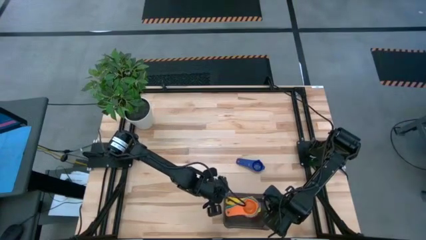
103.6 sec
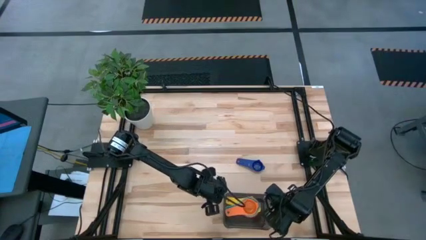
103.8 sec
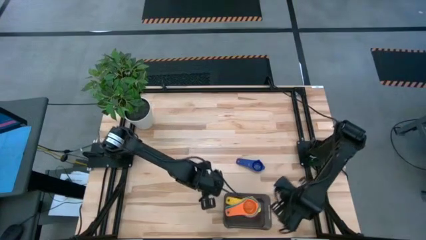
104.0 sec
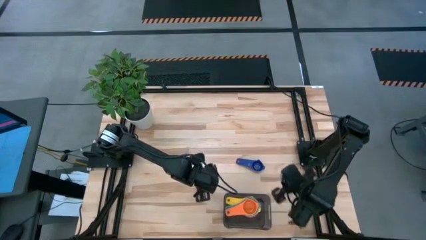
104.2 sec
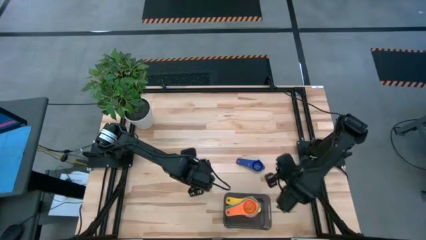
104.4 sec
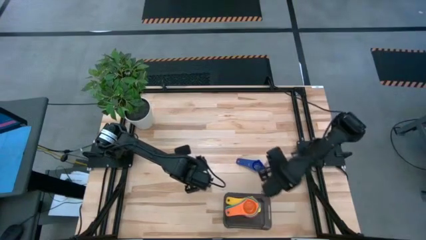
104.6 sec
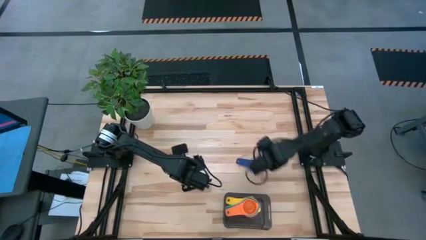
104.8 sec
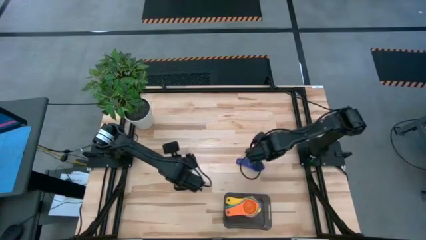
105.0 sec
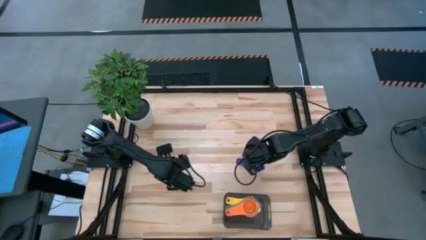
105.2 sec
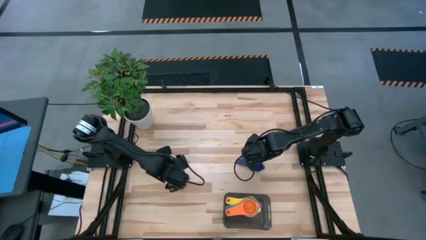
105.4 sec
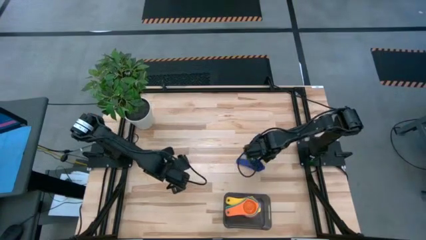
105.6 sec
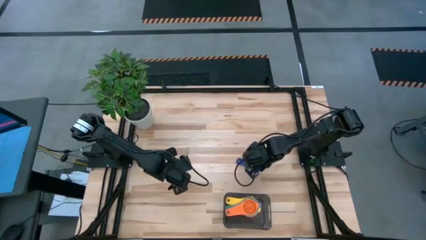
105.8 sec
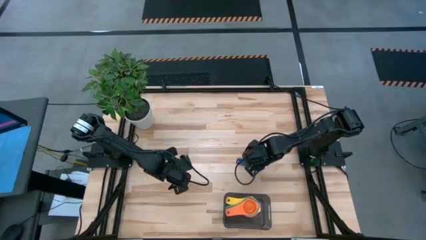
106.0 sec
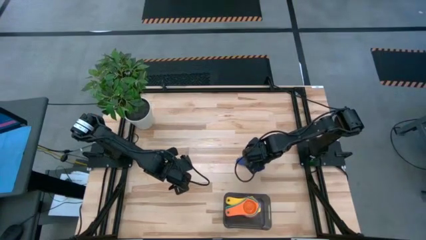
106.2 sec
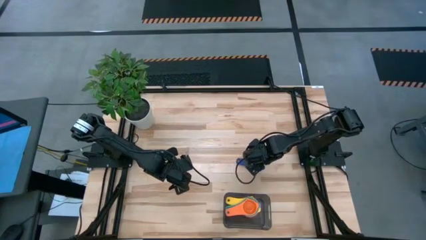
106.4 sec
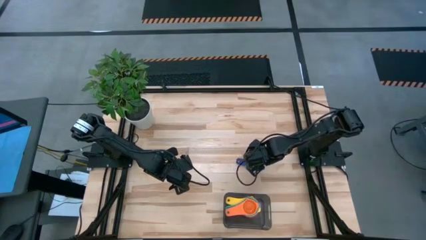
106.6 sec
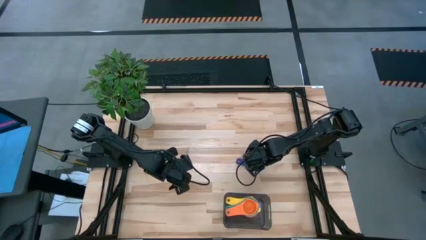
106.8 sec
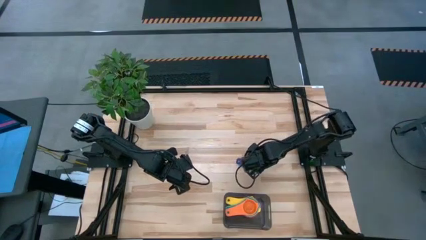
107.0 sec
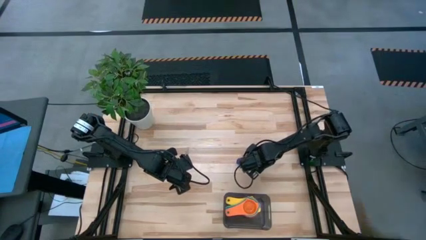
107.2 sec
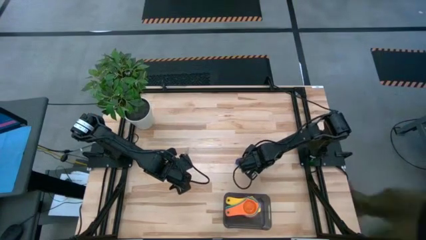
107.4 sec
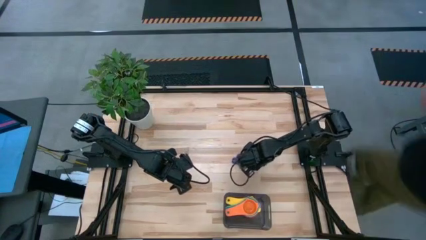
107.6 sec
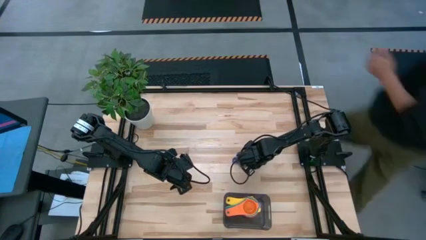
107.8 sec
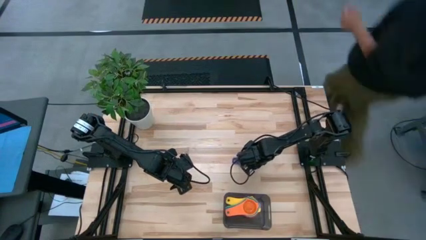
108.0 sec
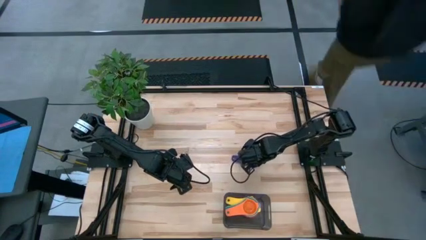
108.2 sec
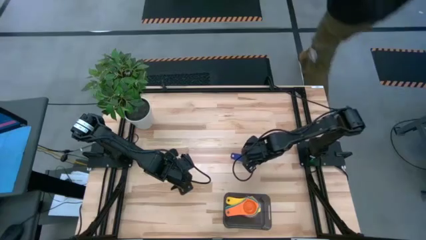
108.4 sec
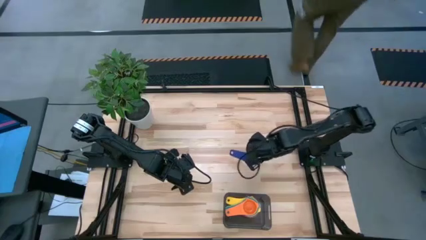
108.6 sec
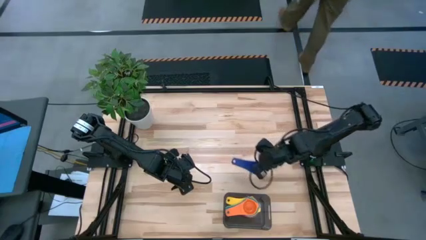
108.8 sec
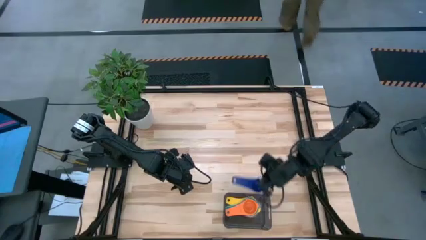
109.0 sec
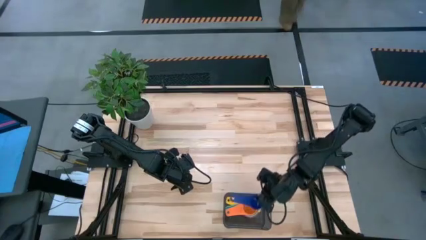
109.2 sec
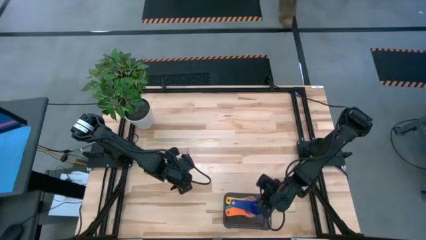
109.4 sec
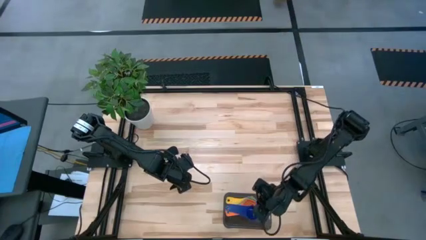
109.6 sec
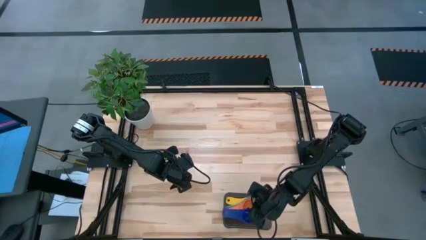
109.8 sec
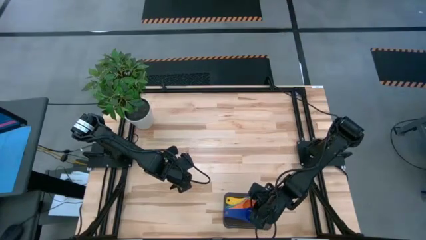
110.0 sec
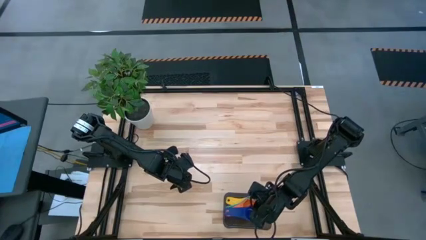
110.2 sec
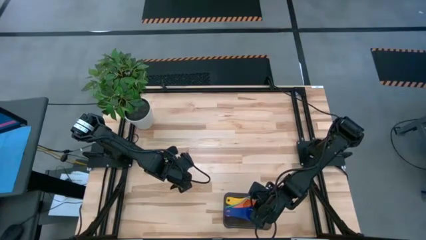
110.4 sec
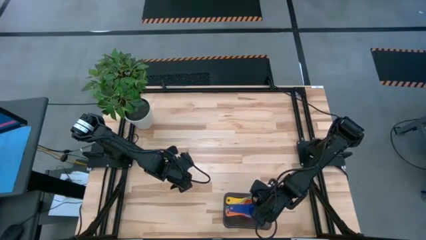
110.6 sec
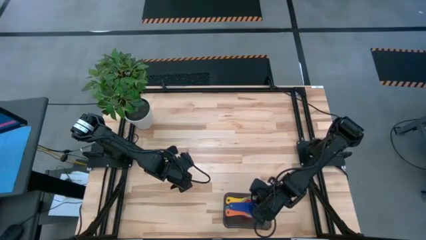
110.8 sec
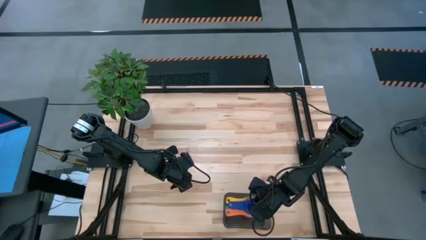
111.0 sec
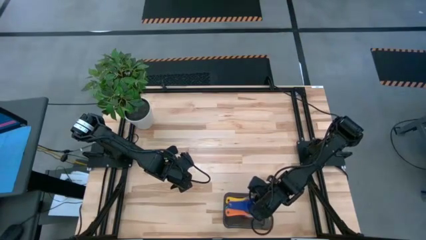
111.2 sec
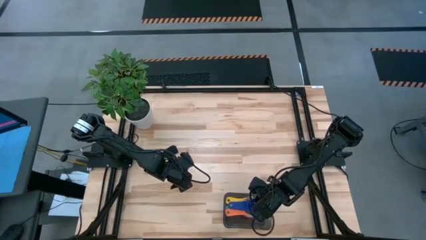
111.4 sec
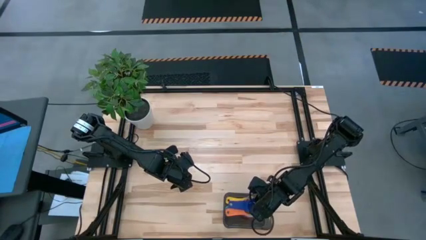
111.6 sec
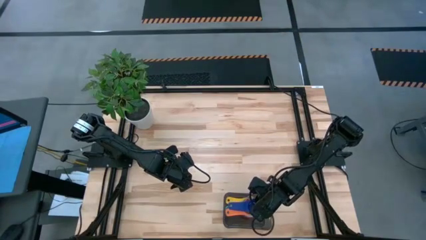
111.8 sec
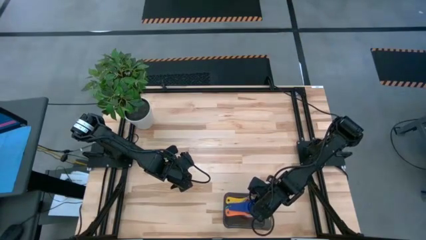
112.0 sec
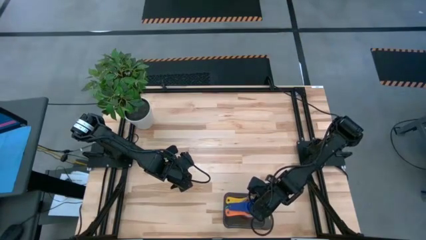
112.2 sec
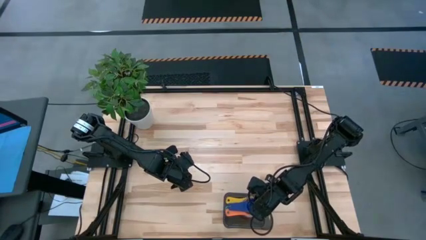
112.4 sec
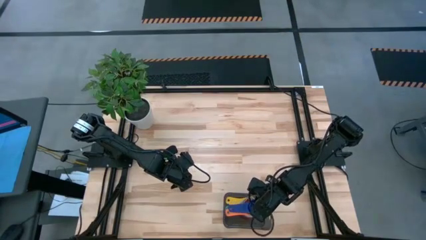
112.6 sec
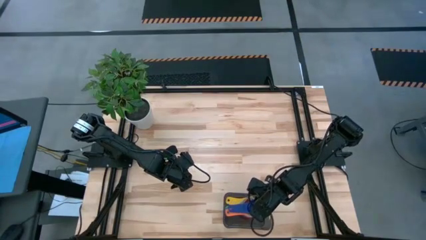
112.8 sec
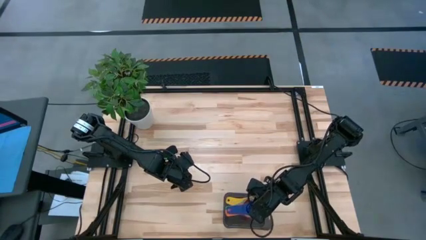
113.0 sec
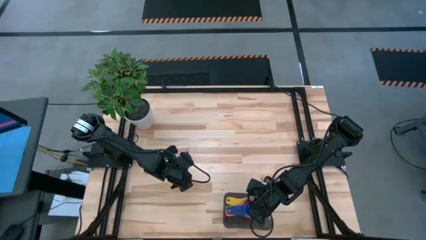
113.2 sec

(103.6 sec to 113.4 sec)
Task: Nest measuring cups in basket
Stack the dark blue measuring cup on top of the orange measuring cup in the black bin

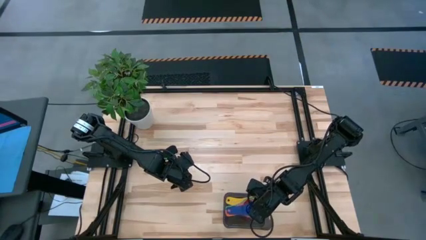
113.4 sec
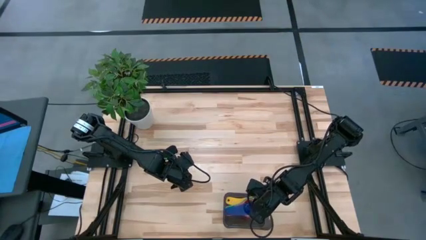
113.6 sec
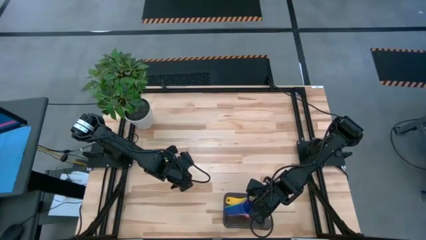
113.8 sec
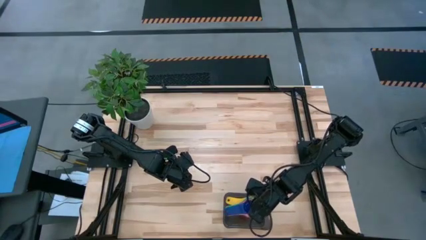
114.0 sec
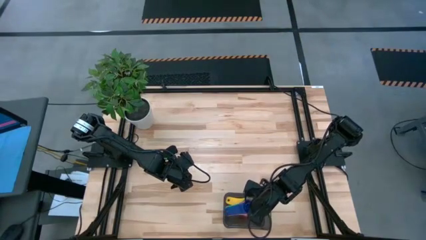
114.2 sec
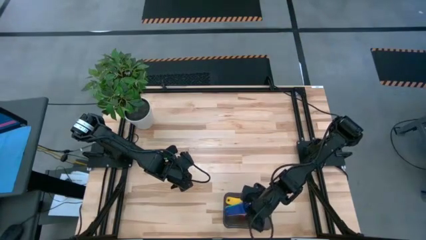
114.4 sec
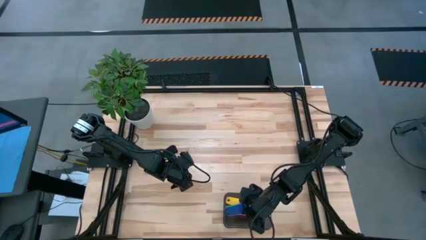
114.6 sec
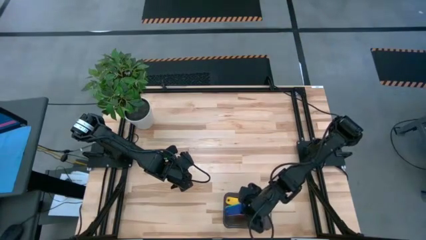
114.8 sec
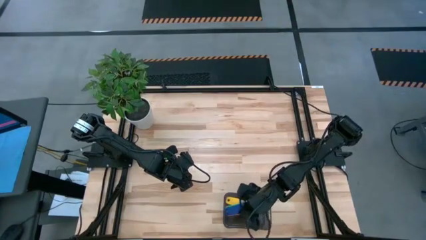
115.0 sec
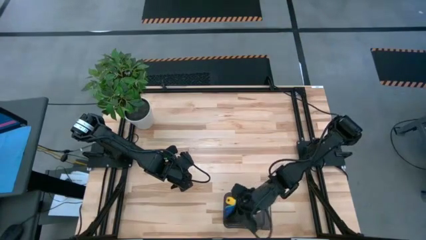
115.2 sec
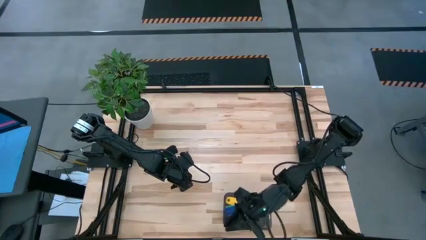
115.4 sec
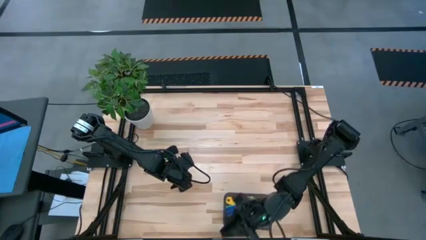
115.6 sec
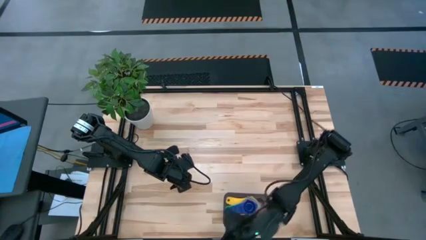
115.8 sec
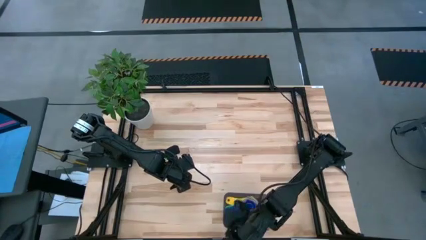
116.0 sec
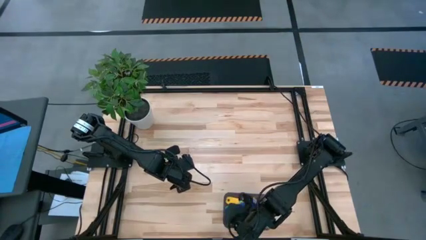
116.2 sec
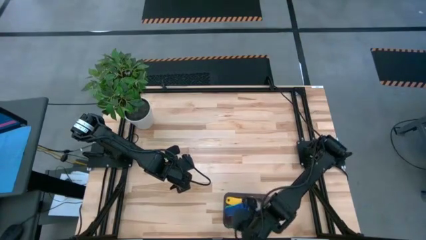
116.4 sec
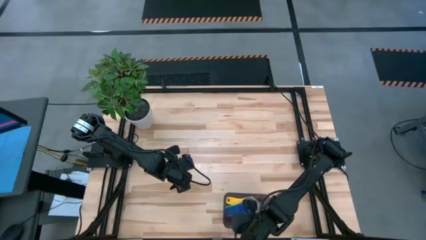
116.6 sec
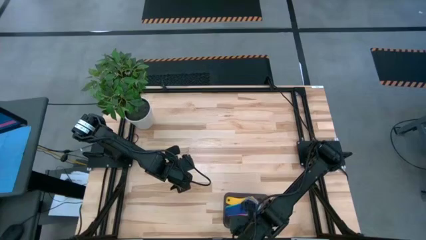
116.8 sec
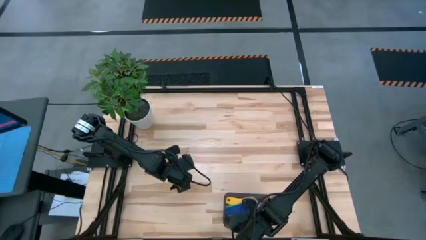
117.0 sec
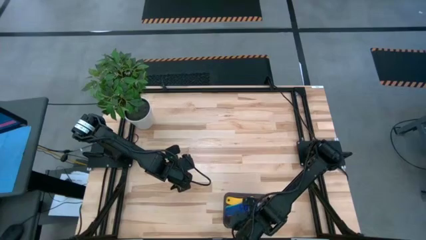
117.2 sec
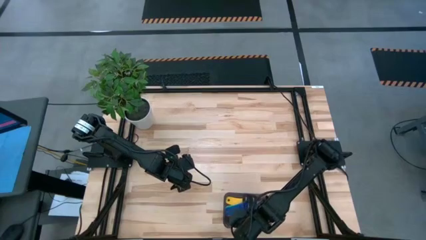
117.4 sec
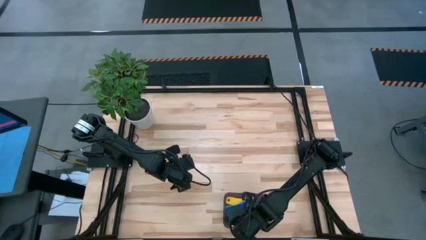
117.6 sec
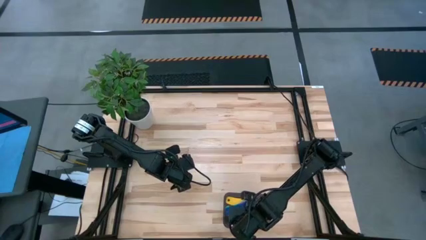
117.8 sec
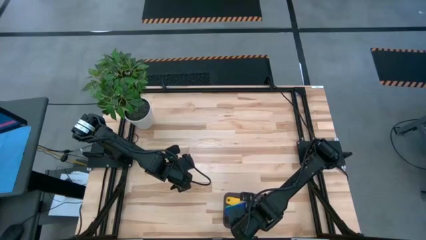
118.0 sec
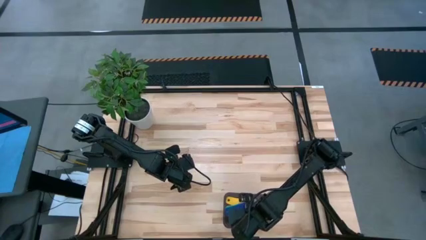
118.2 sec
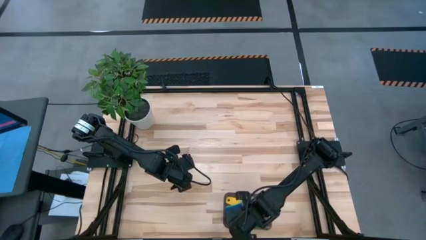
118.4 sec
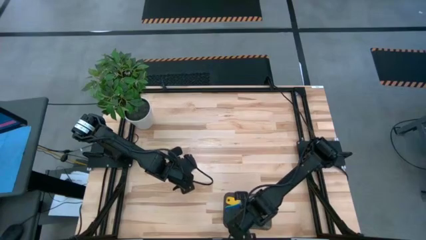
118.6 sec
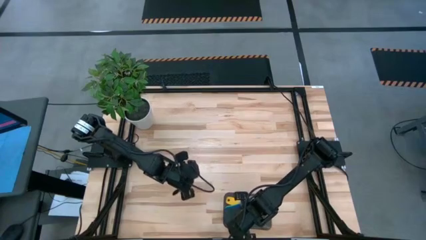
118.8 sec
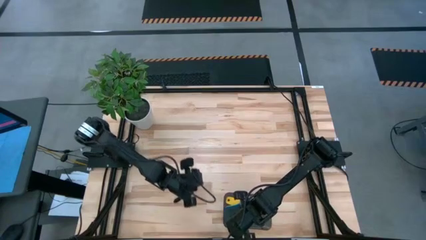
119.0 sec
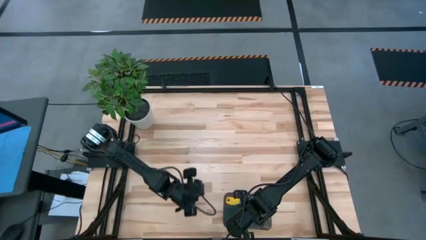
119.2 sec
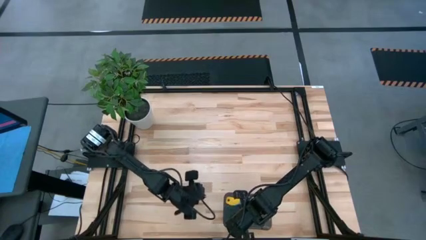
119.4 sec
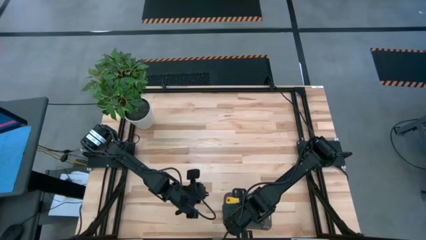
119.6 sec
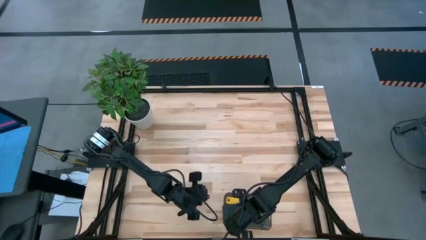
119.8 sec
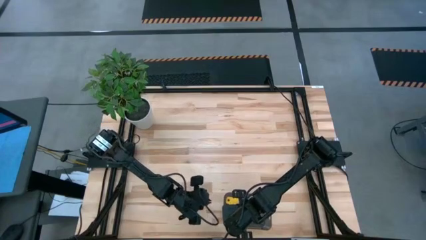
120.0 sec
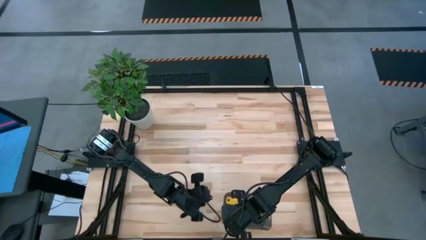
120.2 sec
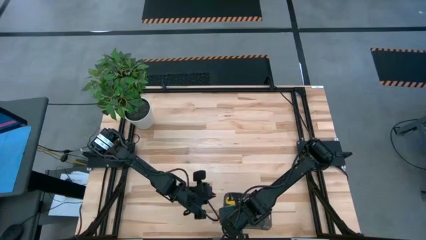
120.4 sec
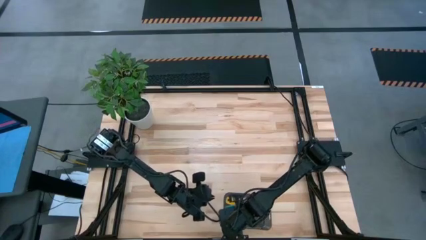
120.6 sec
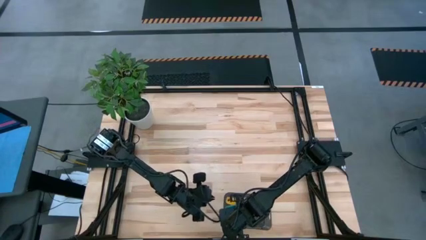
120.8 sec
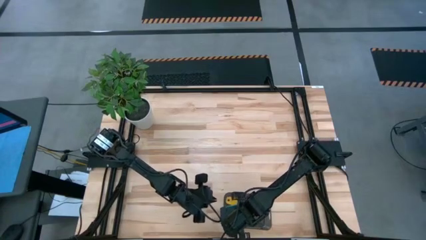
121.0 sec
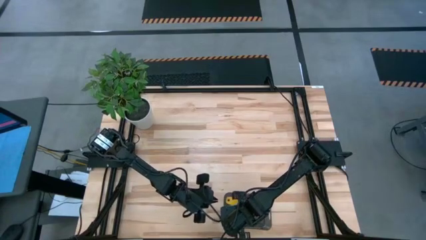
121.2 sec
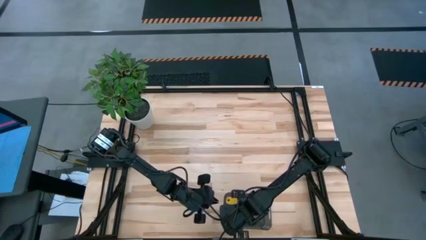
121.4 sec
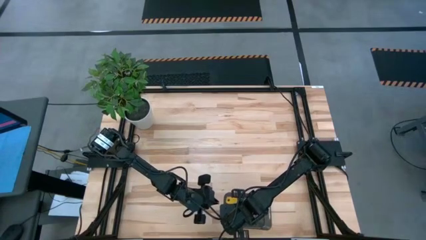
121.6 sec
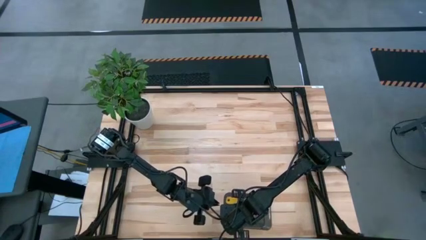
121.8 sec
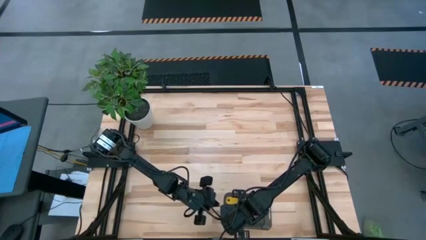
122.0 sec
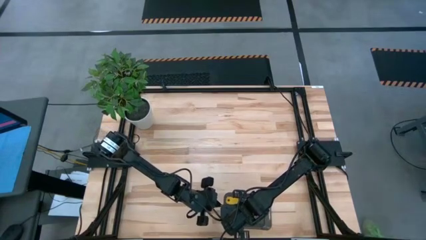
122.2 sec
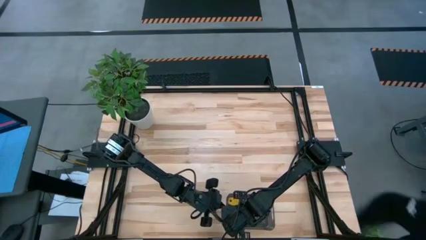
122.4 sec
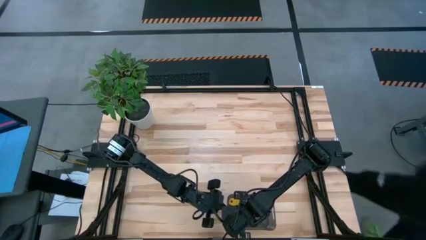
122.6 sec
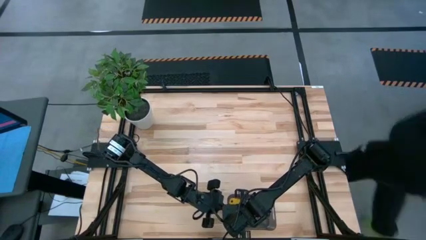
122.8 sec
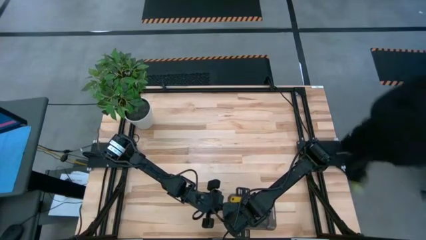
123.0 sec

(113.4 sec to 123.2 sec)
Stack the dark blue measuring cup on top of the orange measuring cup in the black bin
